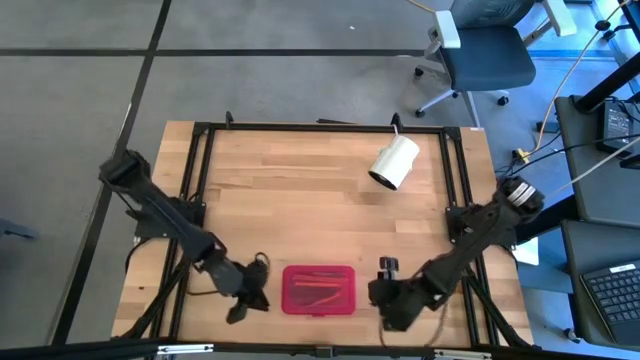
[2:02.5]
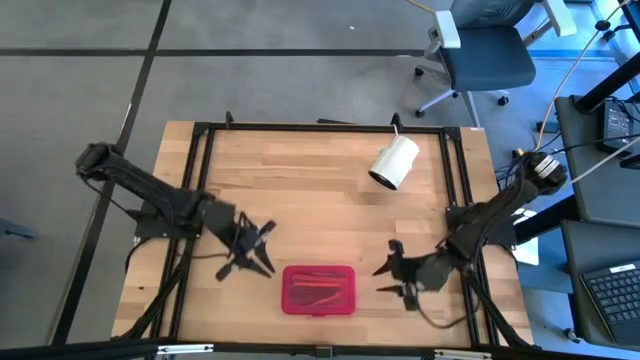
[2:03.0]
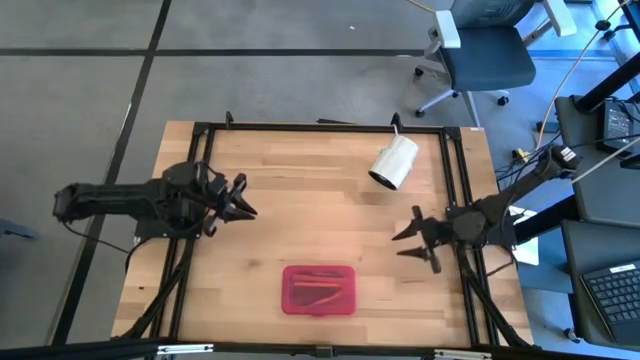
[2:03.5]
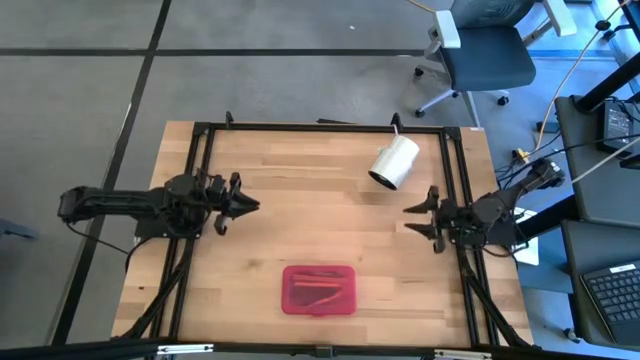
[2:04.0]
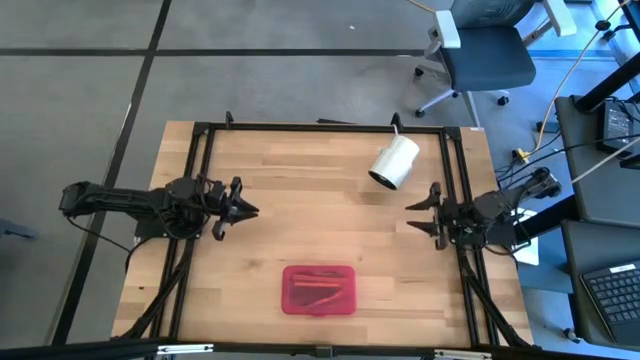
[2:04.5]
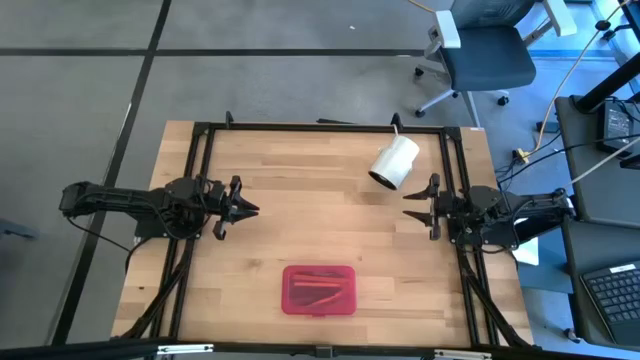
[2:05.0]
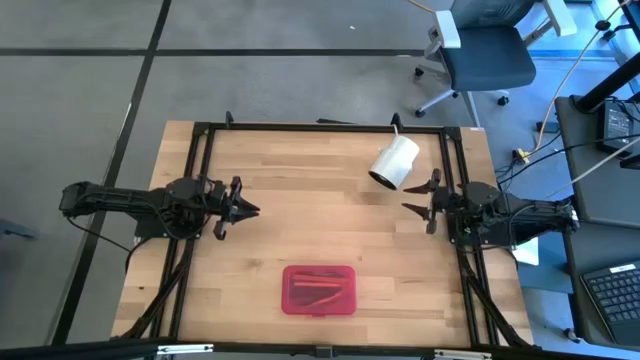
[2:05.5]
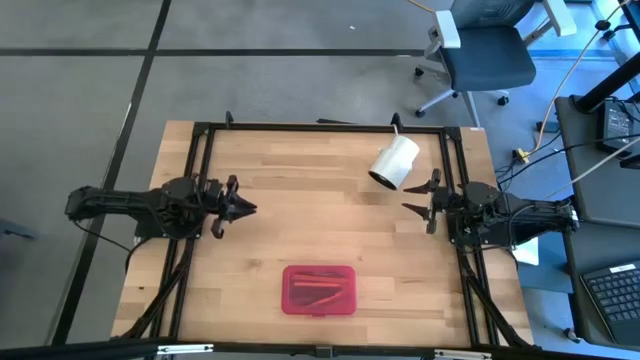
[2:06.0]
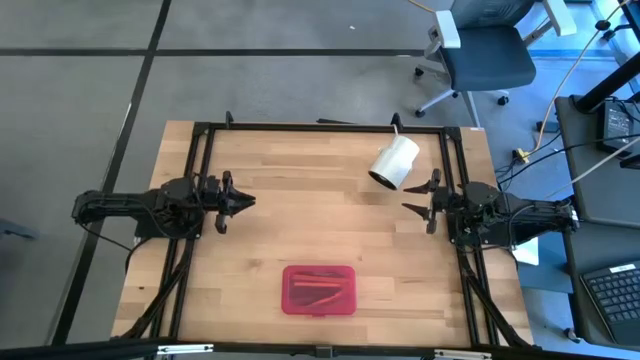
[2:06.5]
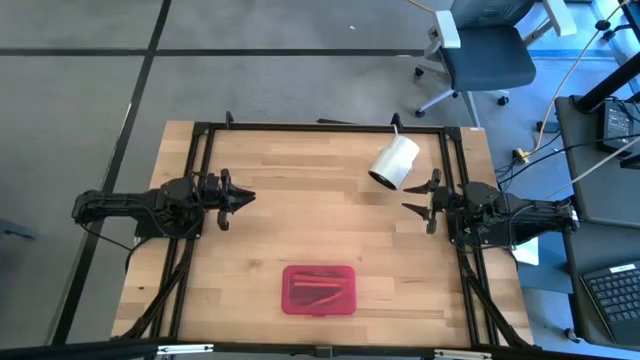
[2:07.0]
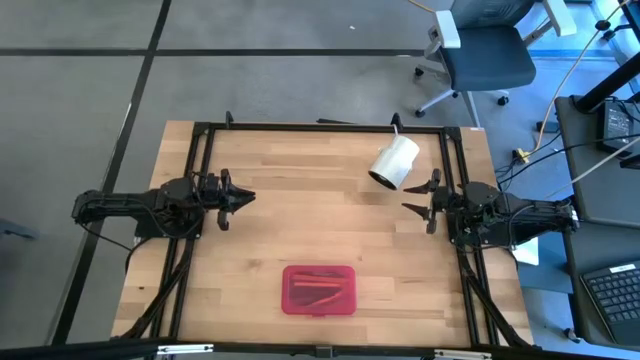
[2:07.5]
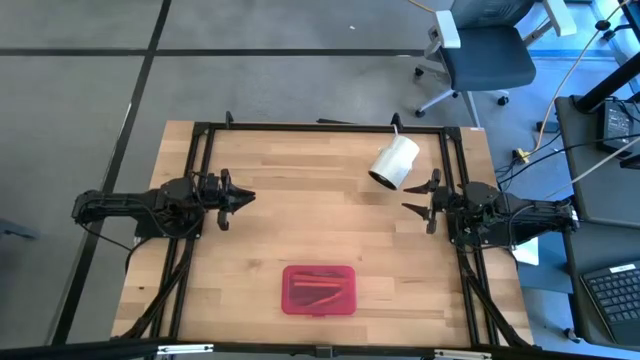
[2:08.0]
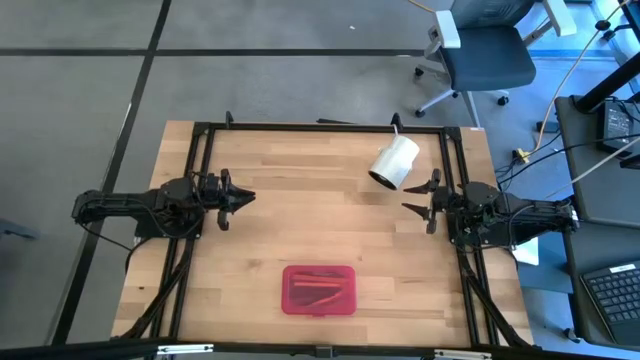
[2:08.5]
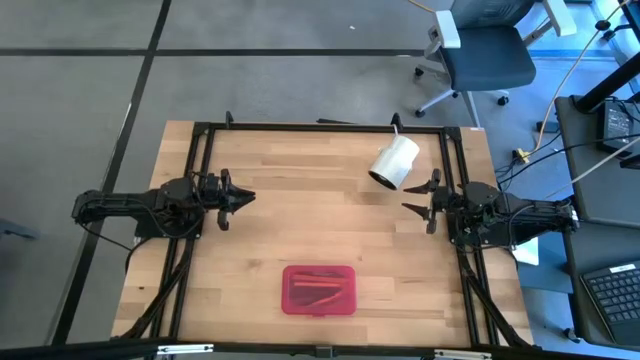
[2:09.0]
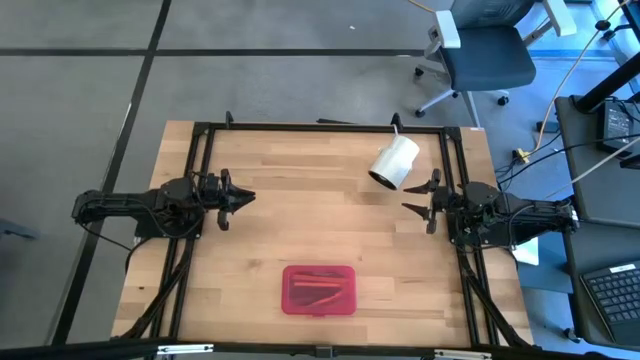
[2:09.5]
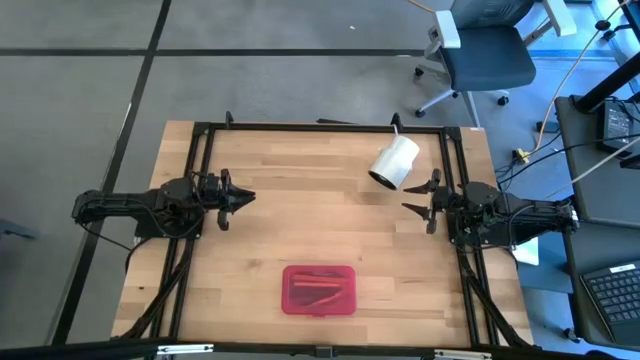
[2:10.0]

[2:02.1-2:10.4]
Task: Pick & place school supplies into a supply box
Return to Home Position

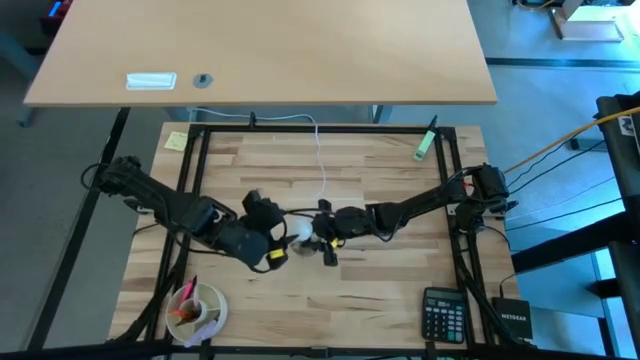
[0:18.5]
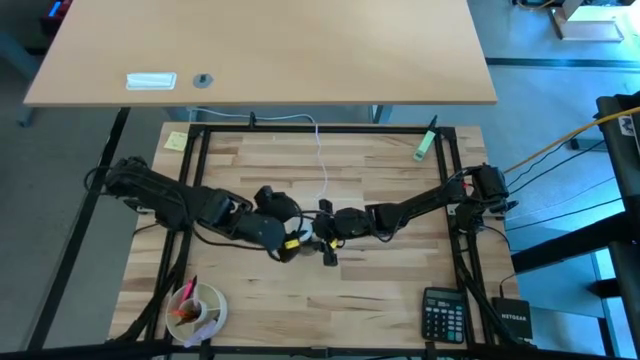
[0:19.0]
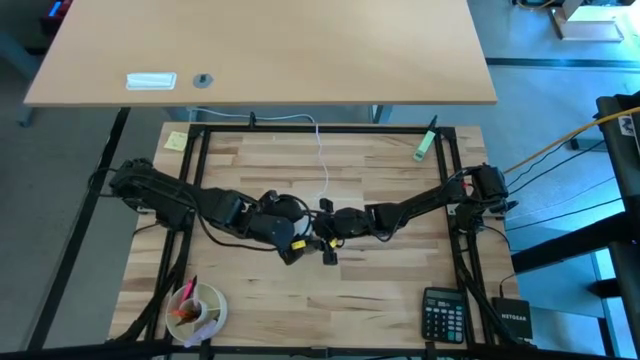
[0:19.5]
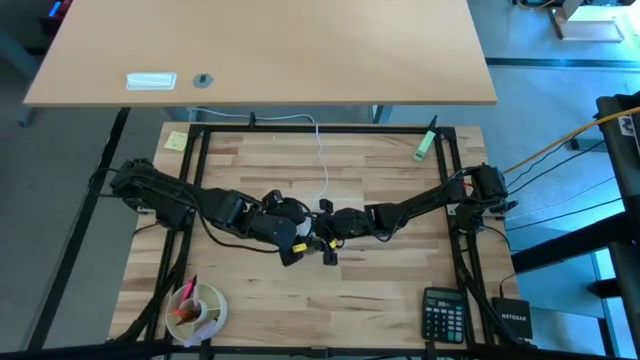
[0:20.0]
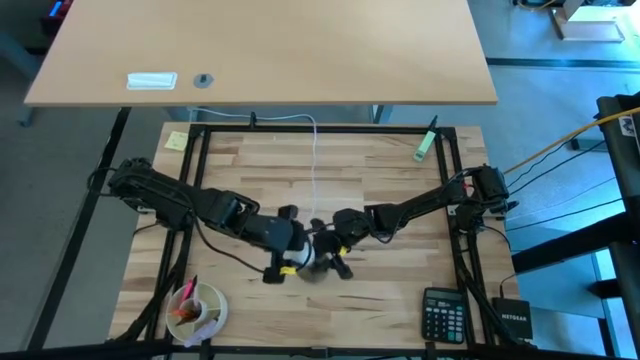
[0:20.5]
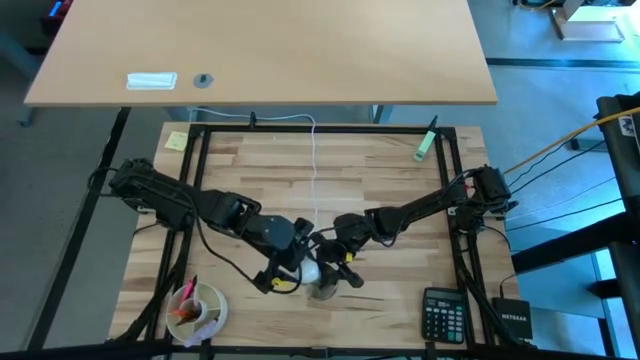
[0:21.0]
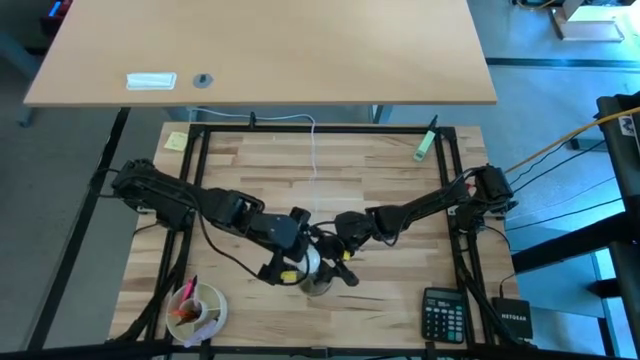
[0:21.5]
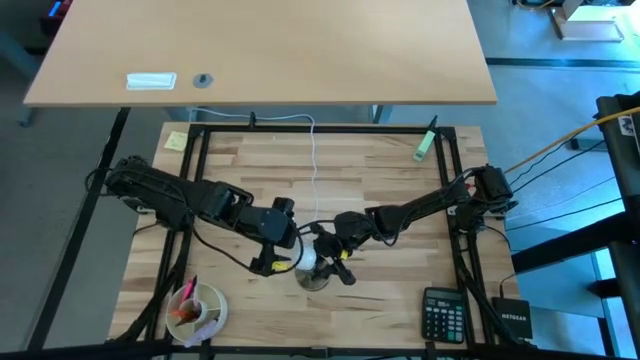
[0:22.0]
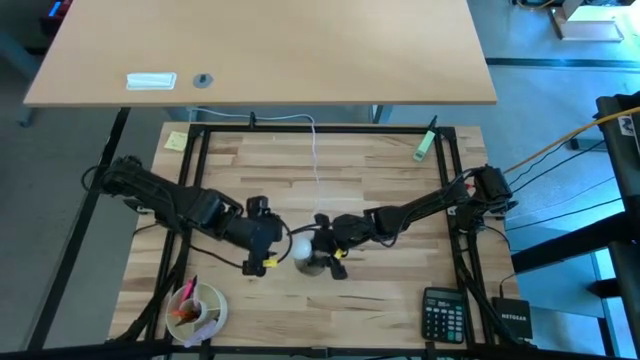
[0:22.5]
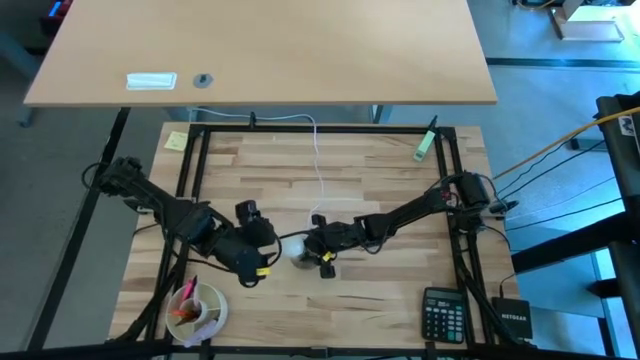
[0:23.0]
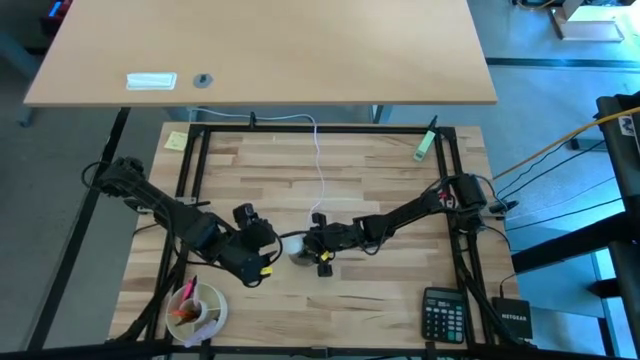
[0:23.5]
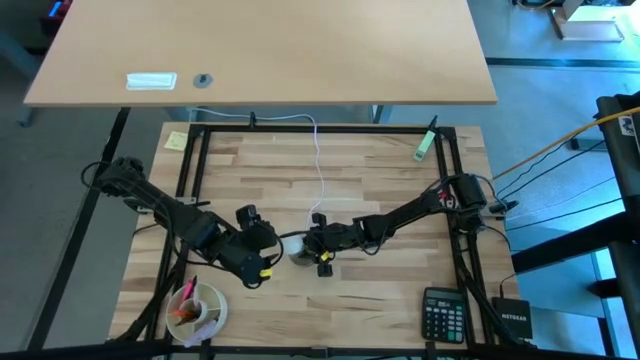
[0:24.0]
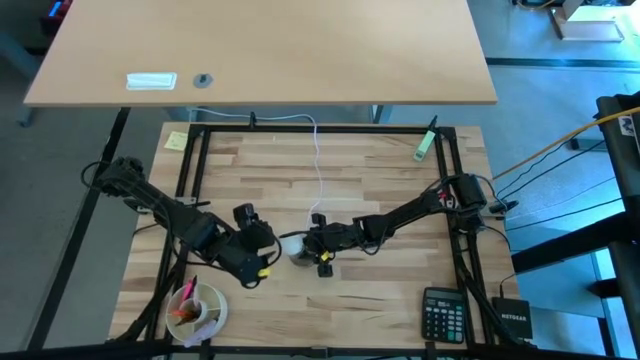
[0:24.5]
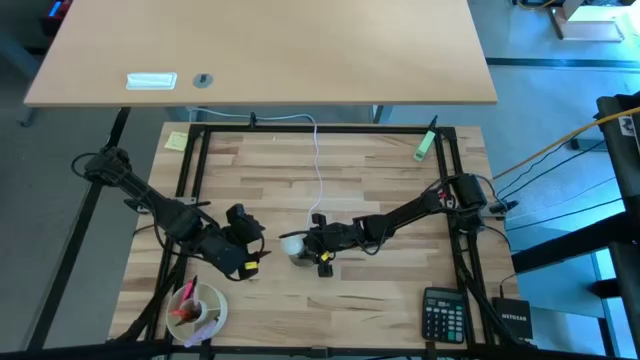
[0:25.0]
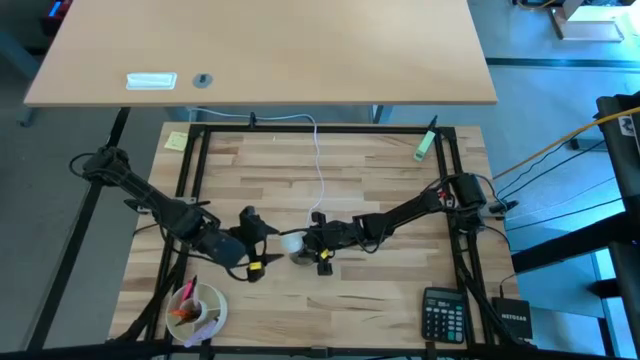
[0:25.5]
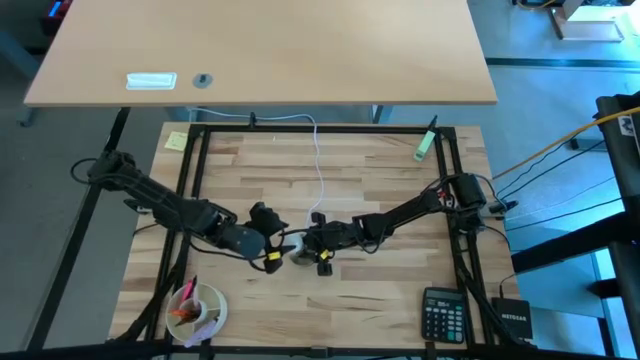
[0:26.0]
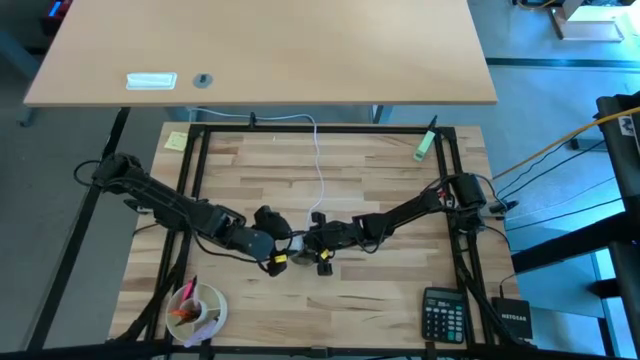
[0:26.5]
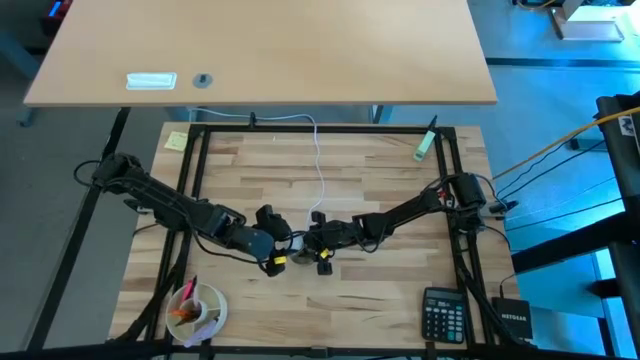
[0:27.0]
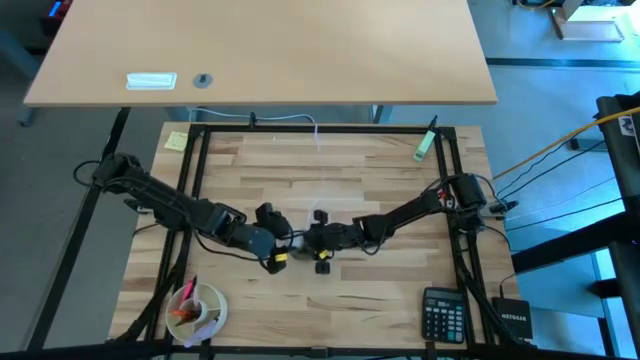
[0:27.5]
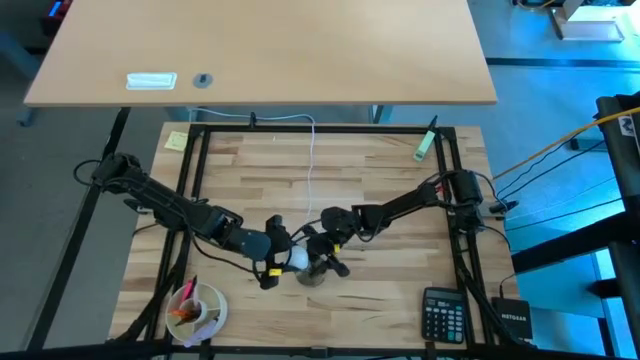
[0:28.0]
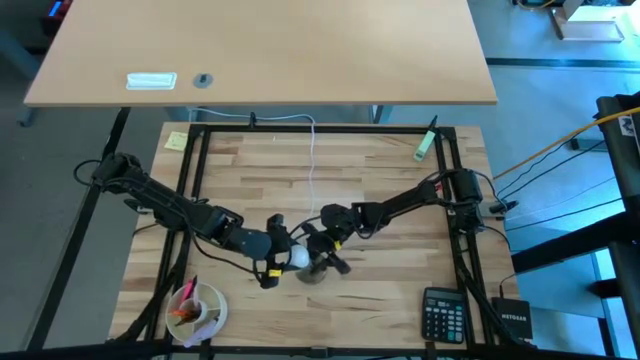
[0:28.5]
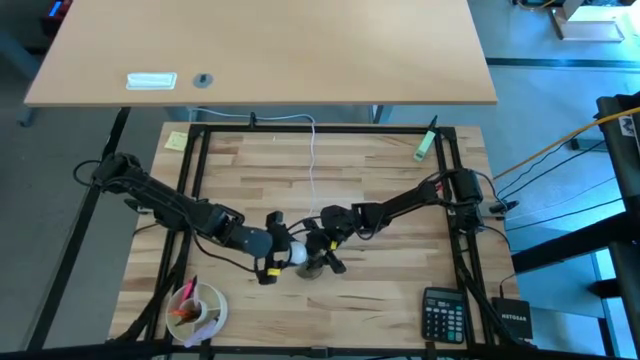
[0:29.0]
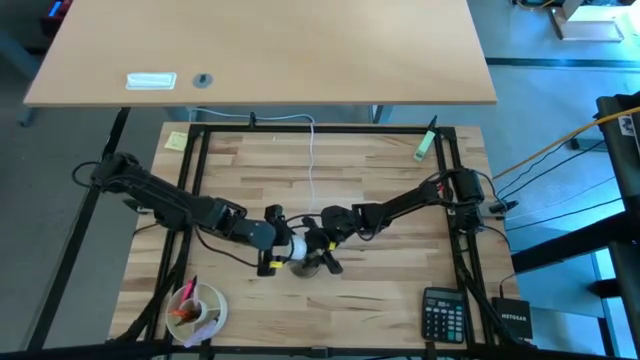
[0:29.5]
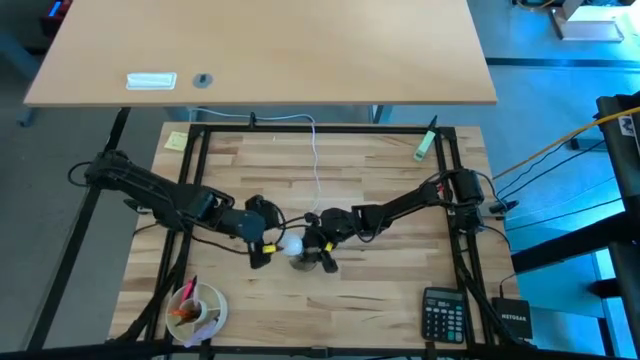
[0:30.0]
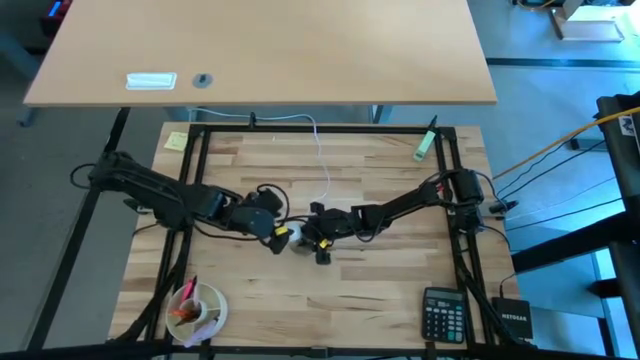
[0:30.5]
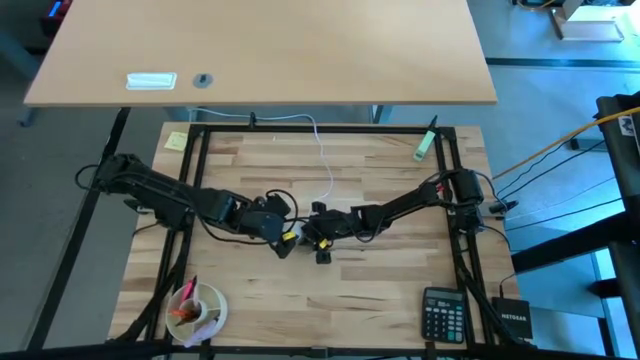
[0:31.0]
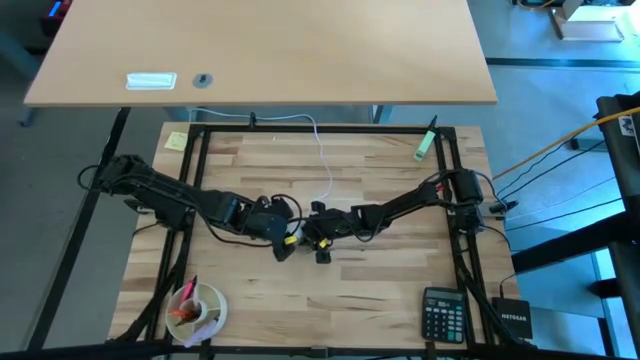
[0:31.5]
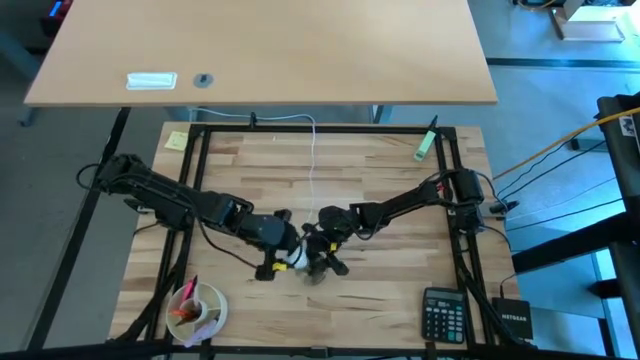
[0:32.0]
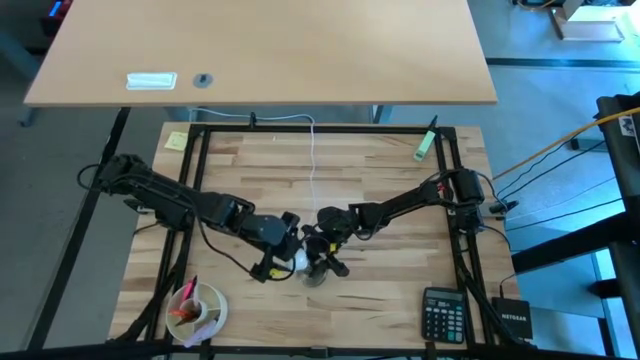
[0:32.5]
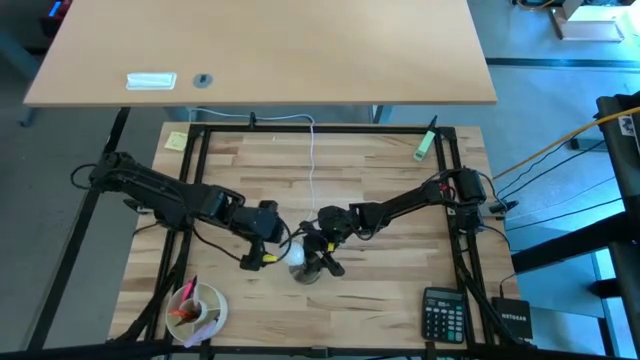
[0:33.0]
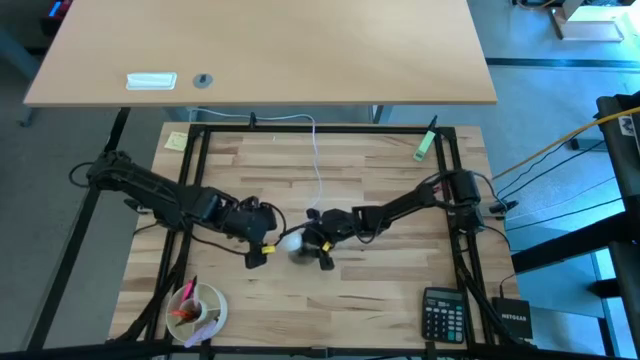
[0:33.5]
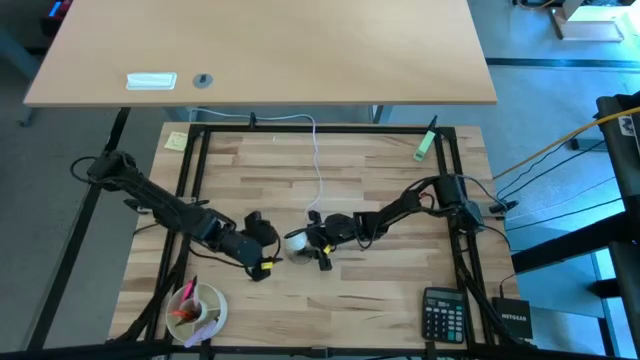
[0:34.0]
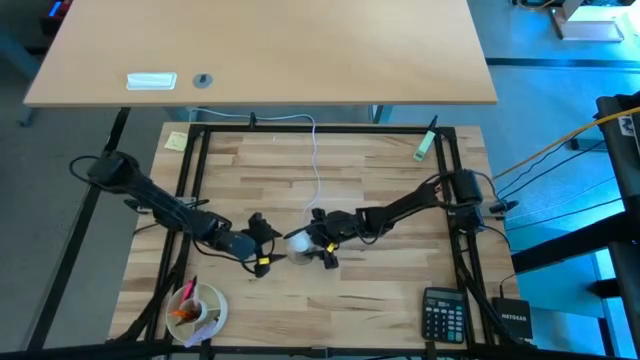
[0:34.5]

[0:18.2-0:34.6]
Task: Screw lightbulb
Insert the lightbulb into the lamp
